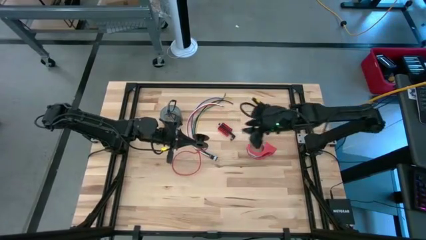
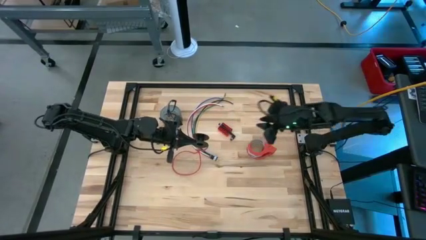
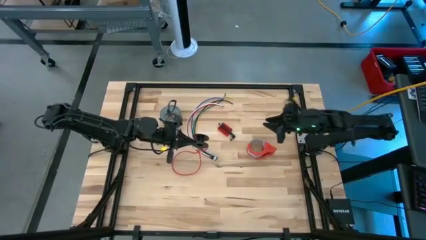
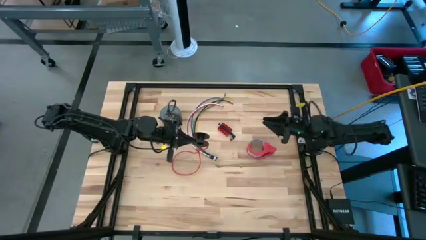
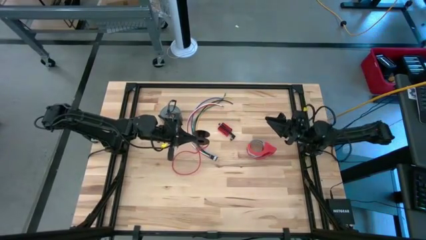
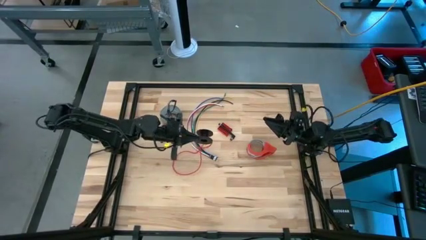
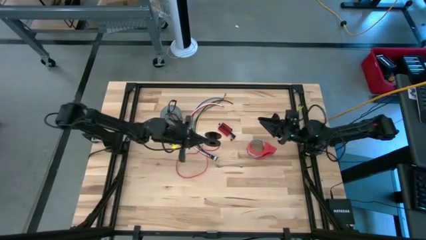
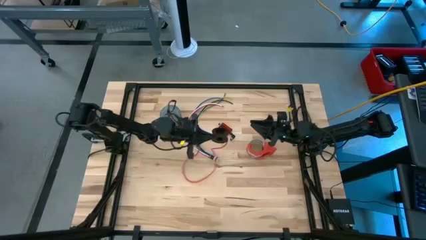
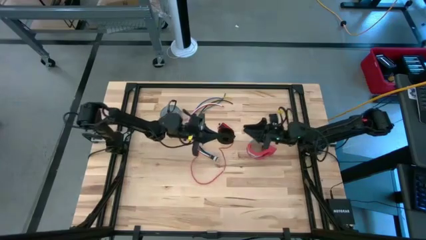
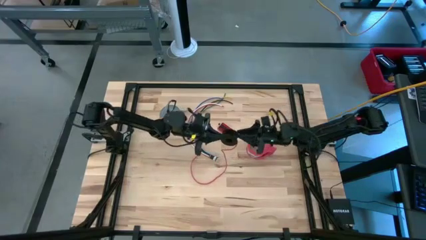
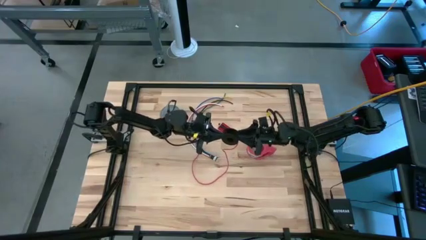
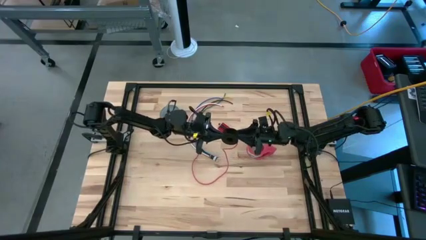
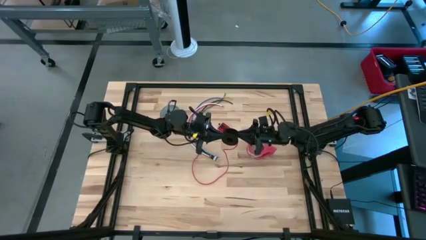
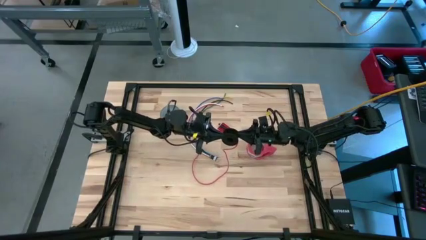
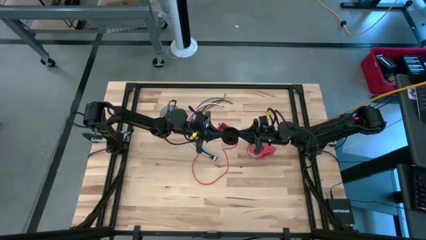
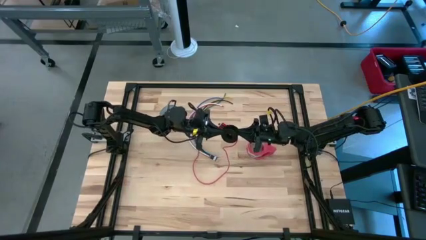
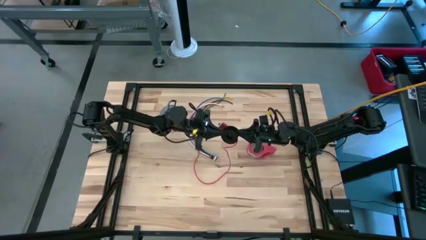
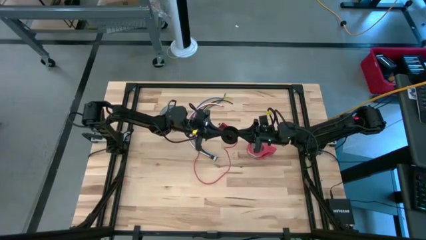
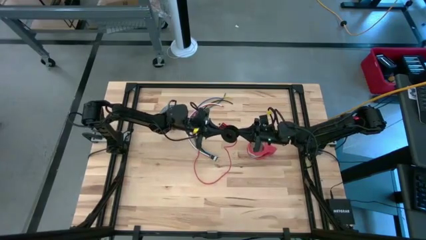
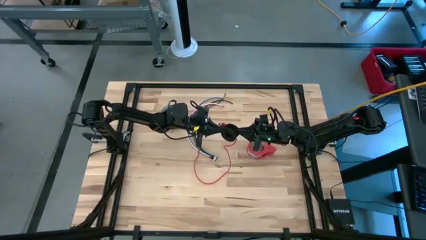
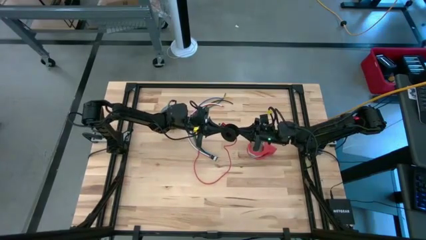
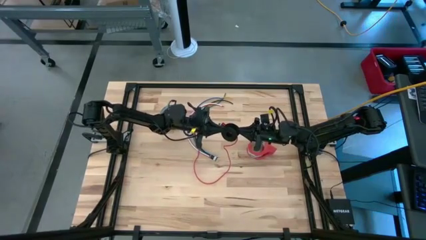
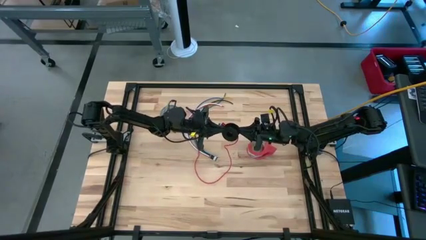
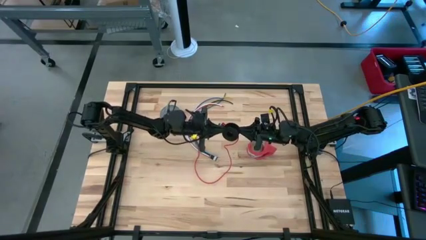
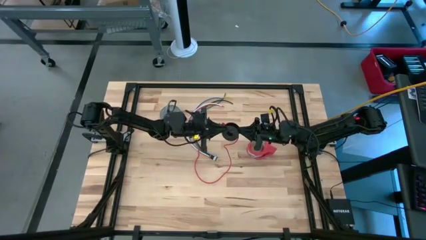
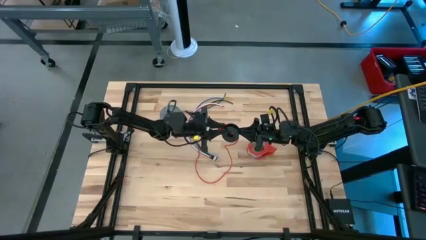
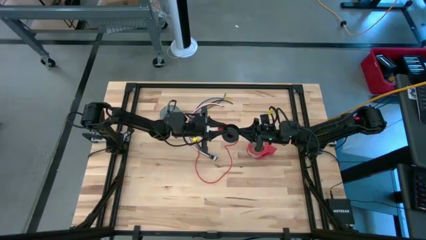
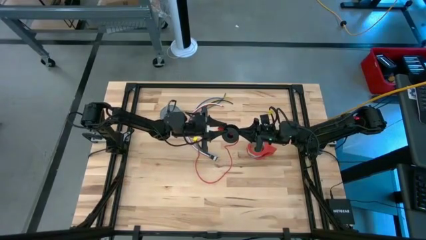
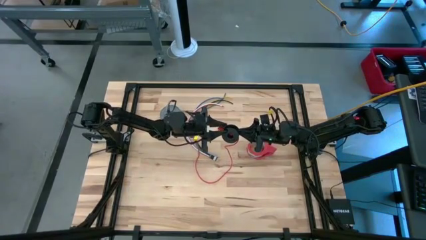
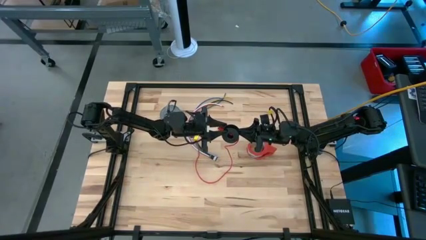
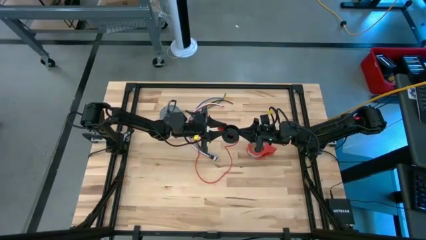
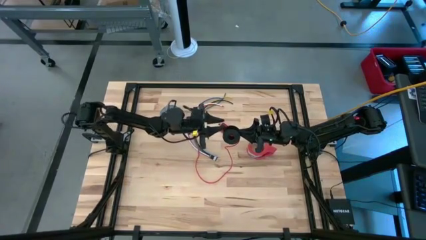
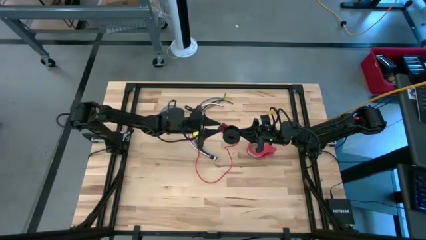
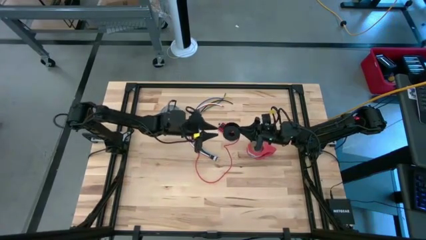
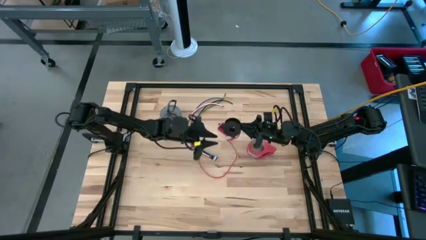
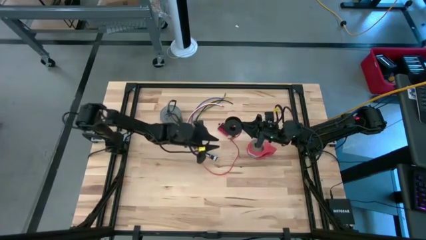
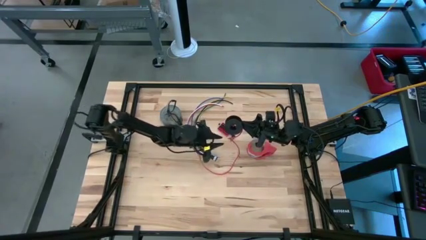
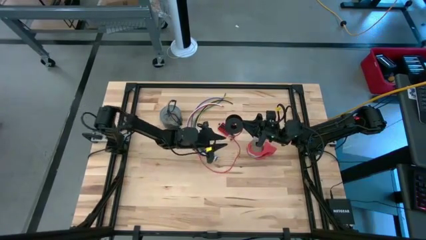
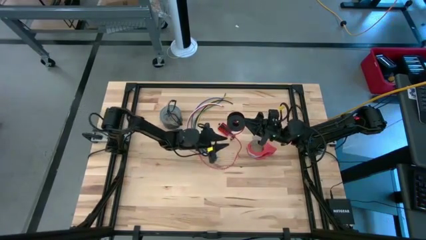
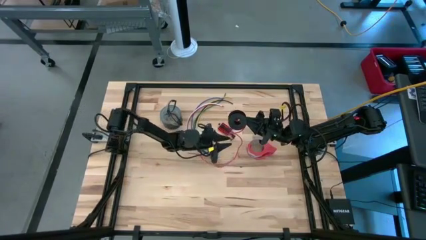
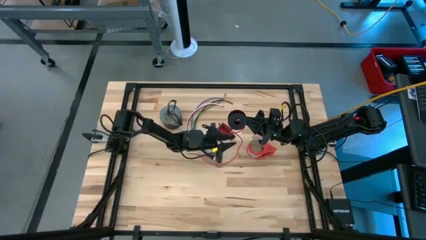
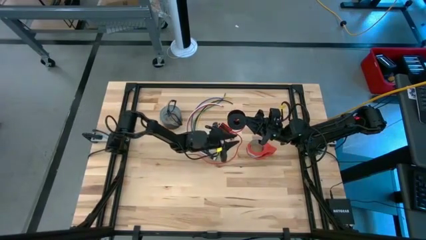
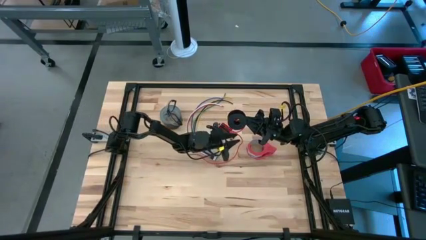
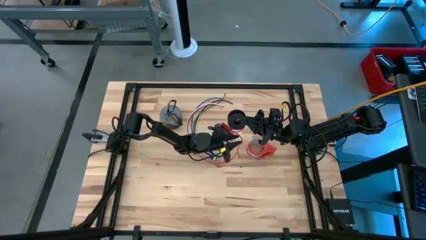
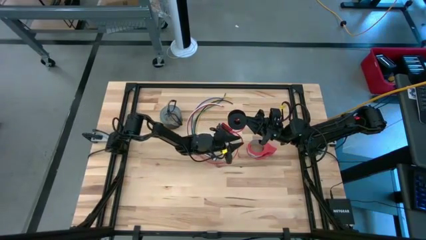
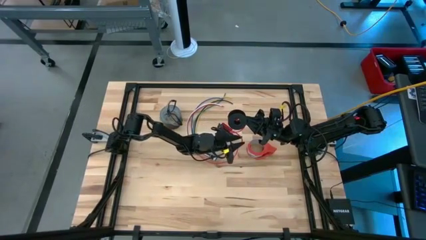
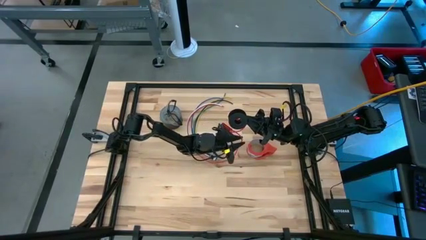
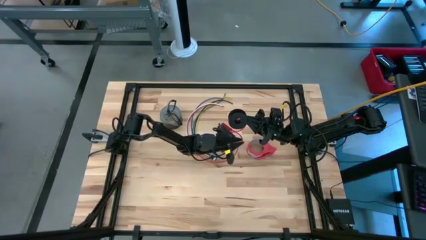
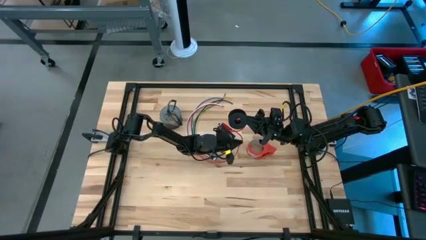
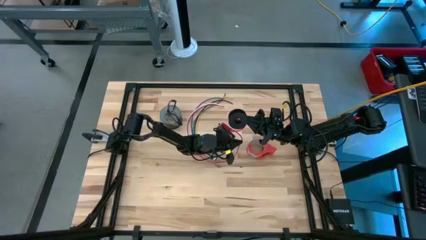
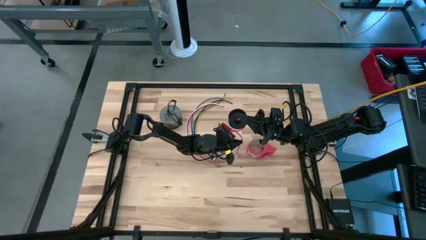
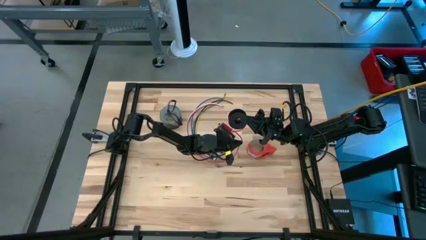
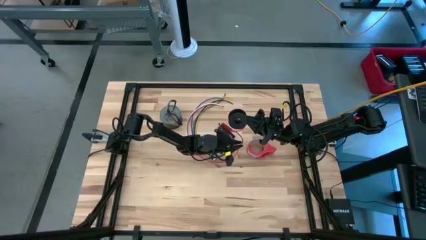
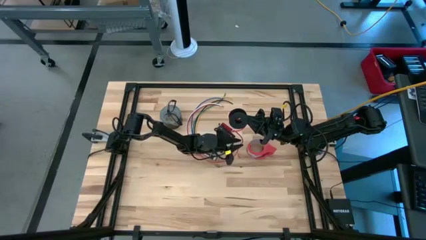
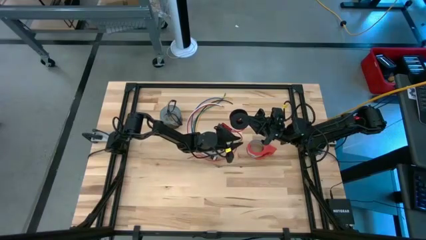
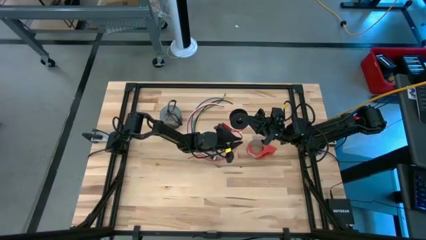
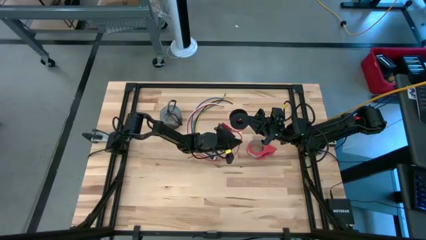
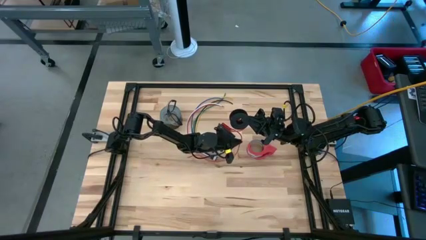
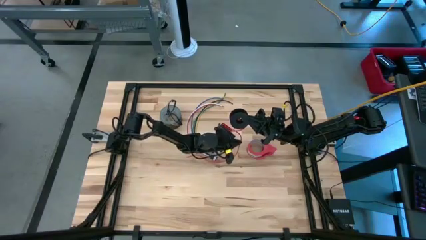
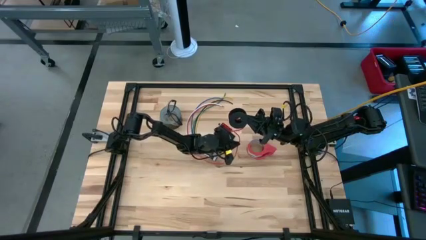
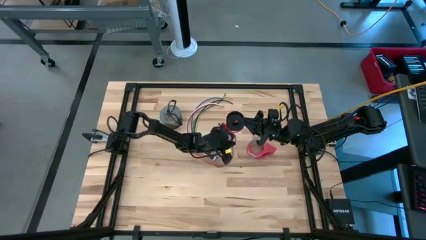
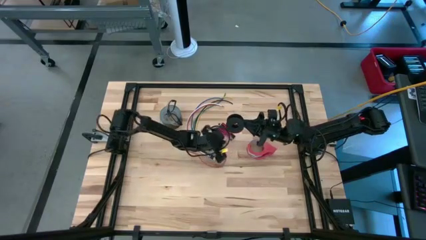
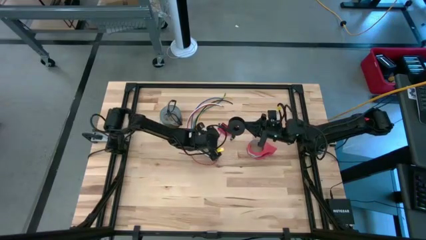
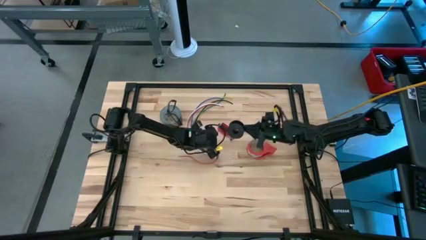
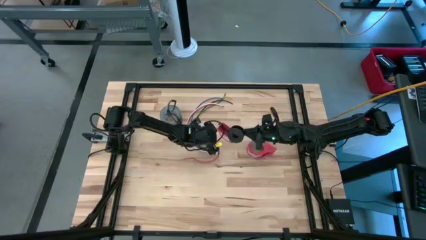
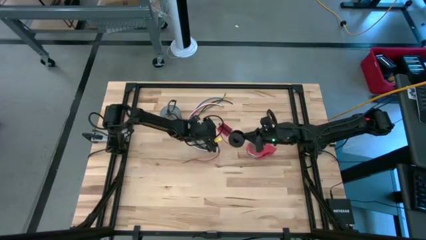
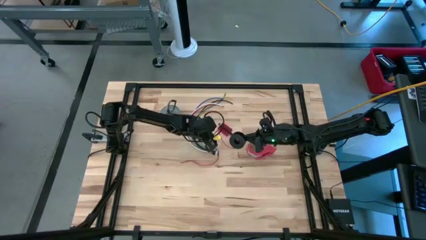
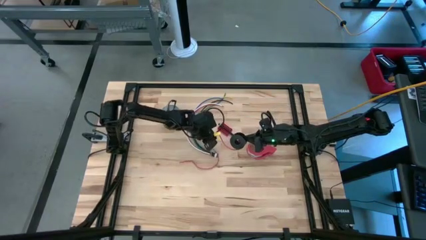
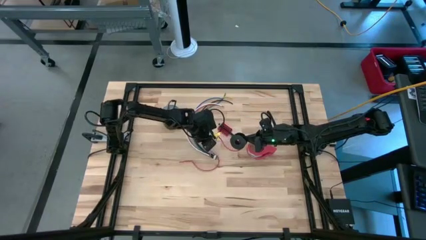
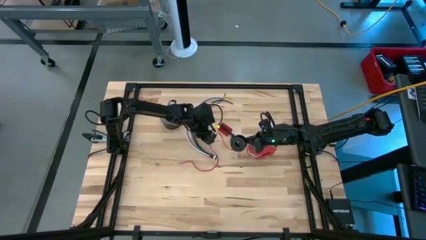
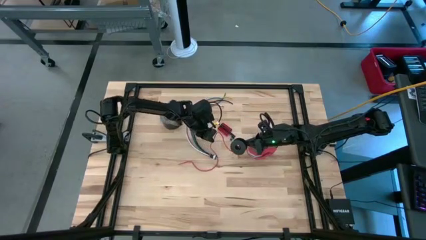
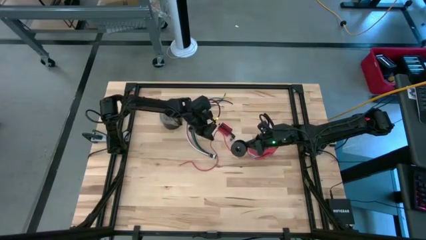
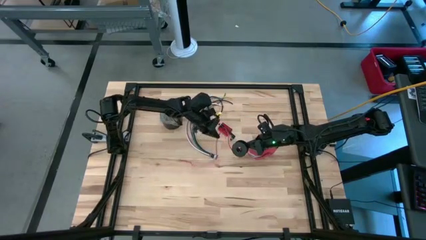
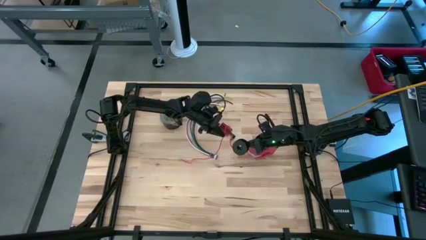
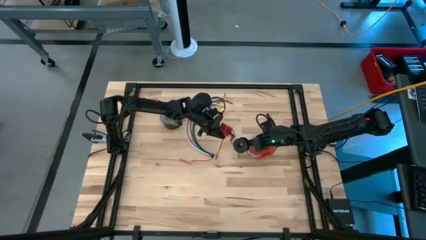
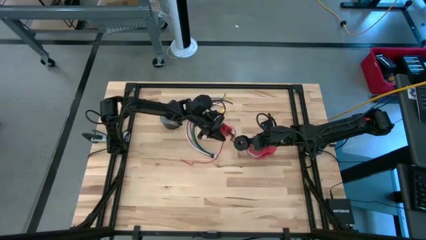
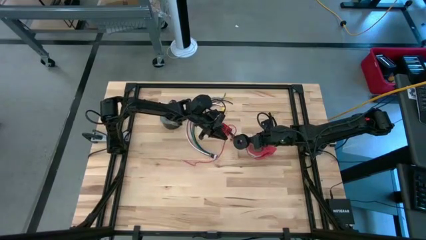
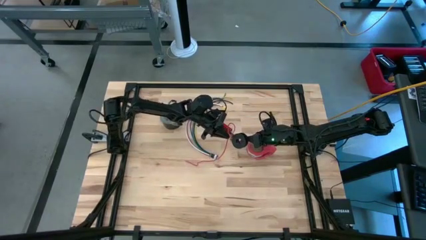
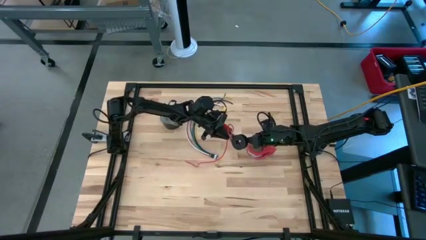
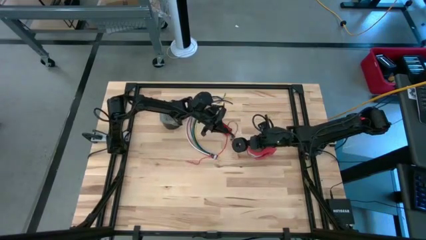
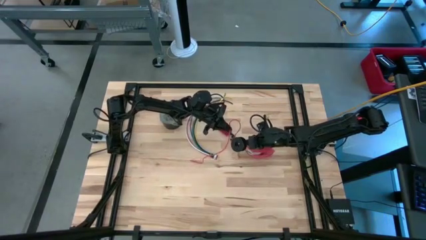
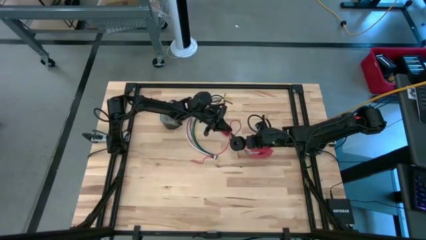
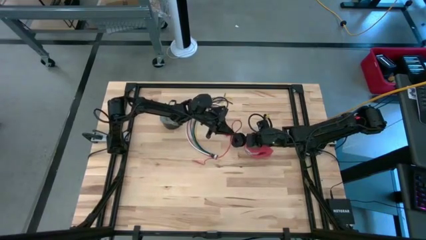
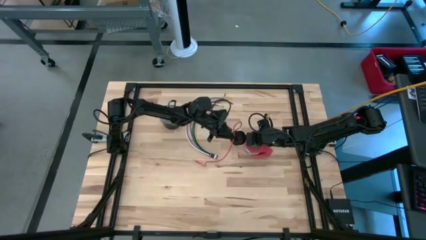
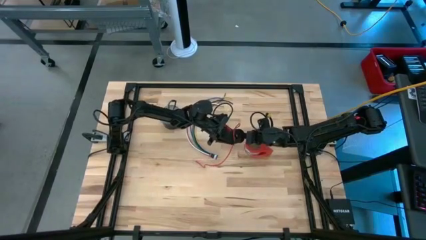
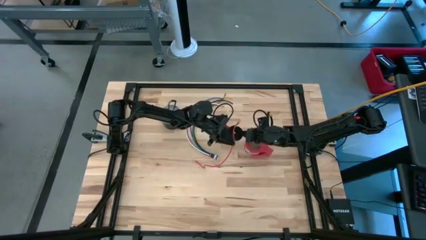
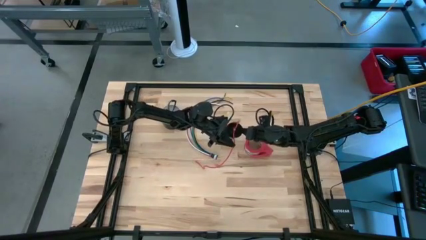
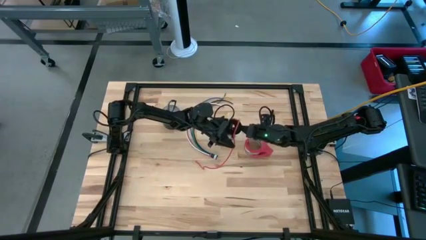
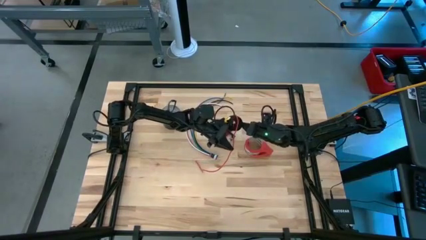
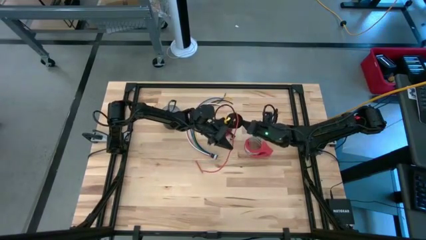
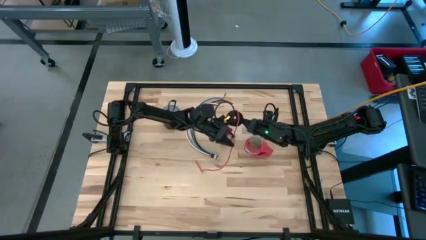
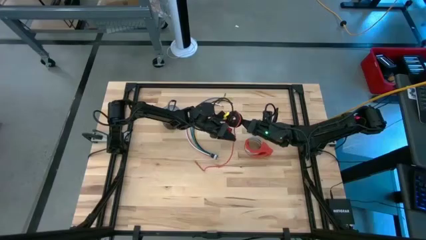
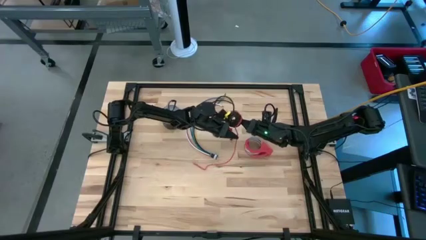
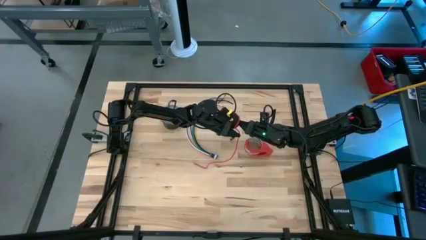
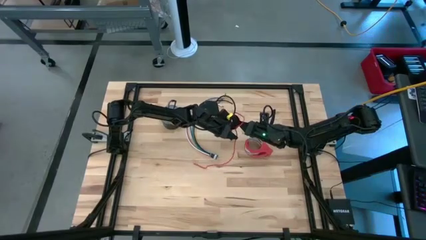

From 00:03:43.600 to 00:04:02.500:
Task: Coil cords
Coil the red wire onto the spool
